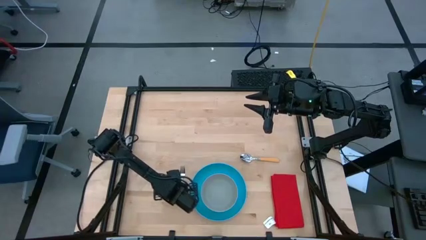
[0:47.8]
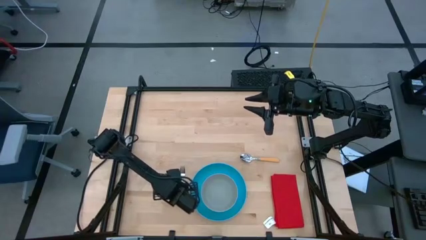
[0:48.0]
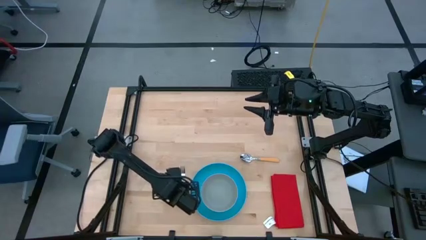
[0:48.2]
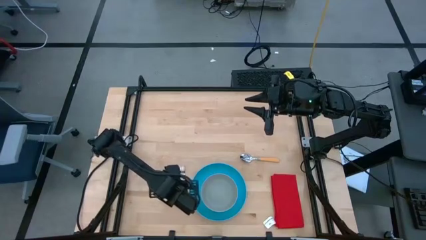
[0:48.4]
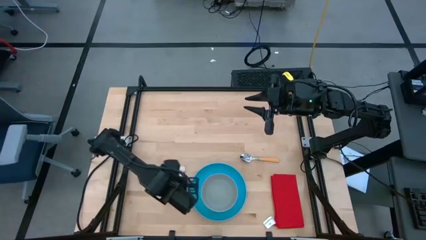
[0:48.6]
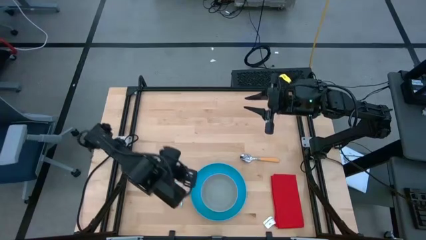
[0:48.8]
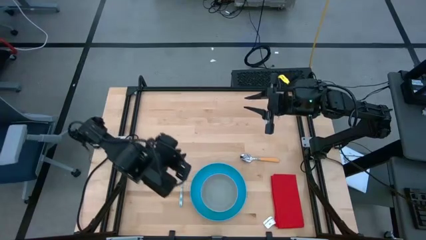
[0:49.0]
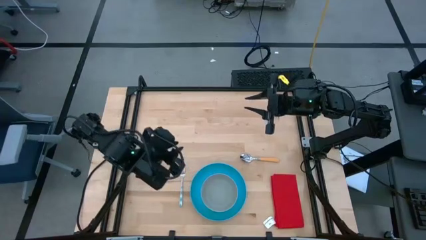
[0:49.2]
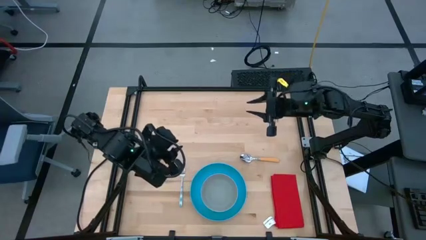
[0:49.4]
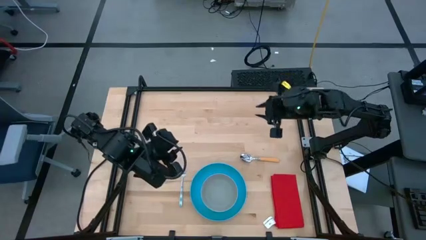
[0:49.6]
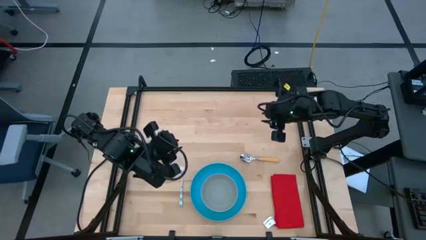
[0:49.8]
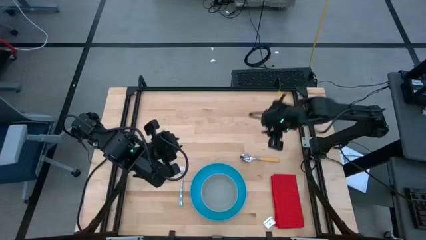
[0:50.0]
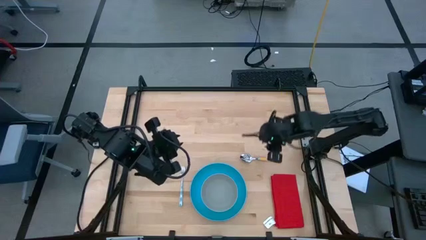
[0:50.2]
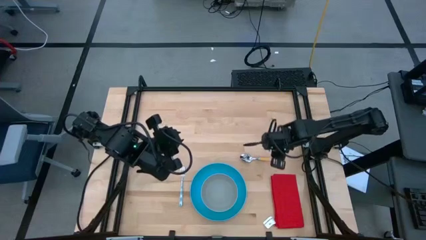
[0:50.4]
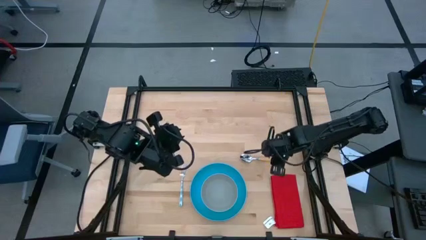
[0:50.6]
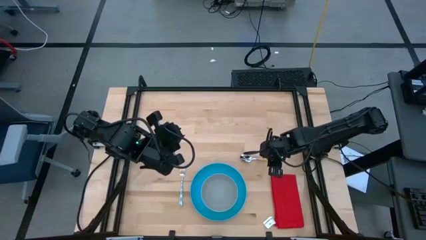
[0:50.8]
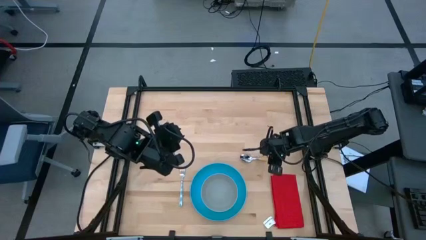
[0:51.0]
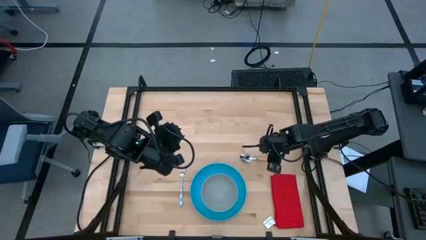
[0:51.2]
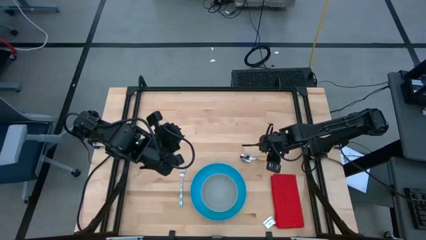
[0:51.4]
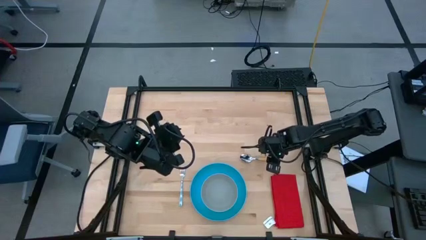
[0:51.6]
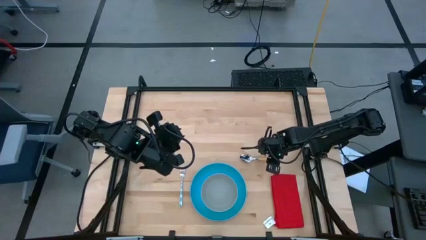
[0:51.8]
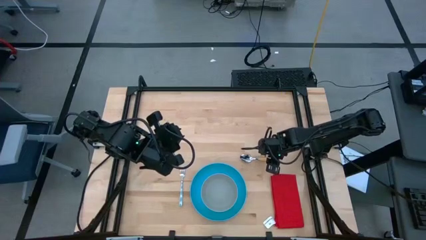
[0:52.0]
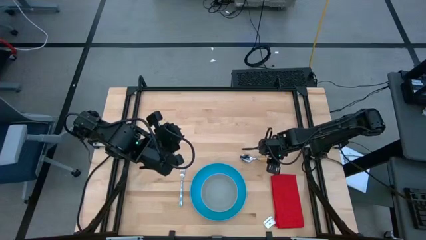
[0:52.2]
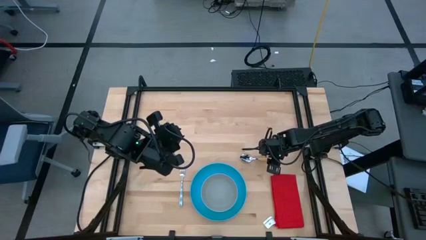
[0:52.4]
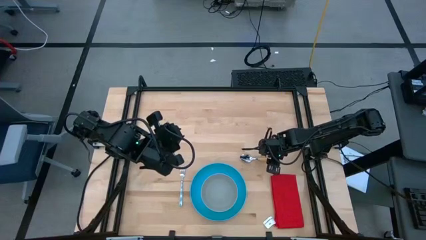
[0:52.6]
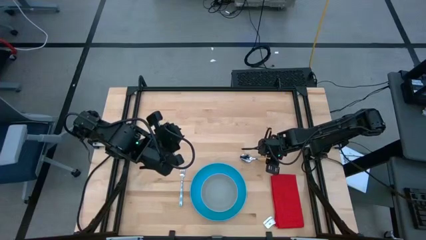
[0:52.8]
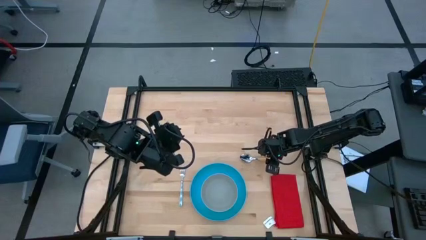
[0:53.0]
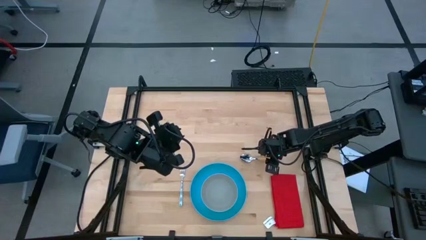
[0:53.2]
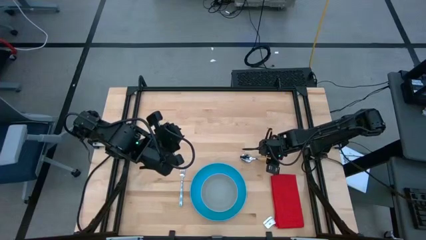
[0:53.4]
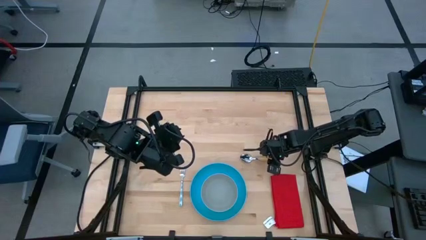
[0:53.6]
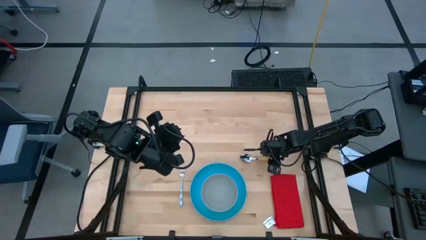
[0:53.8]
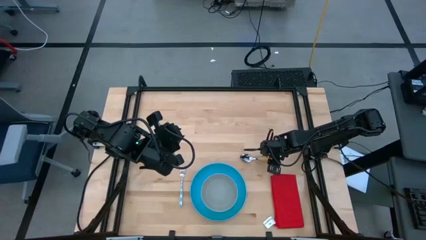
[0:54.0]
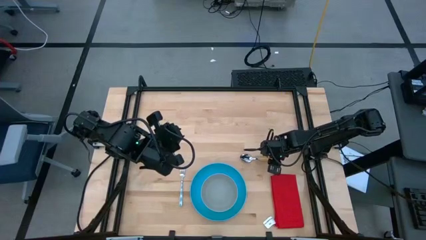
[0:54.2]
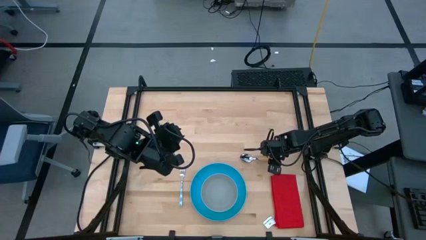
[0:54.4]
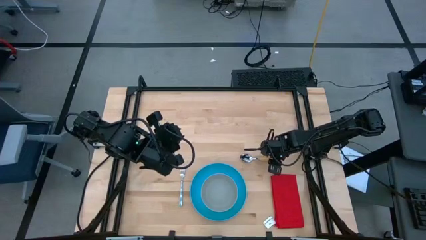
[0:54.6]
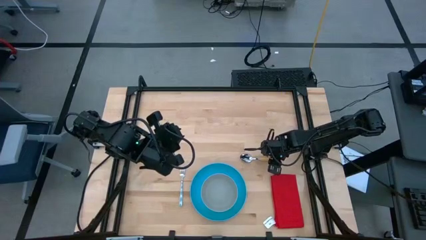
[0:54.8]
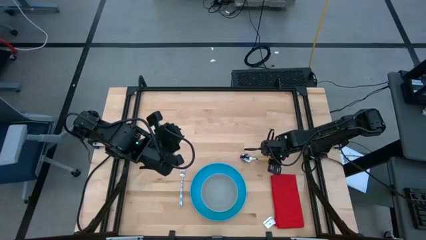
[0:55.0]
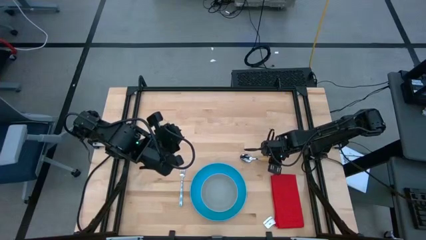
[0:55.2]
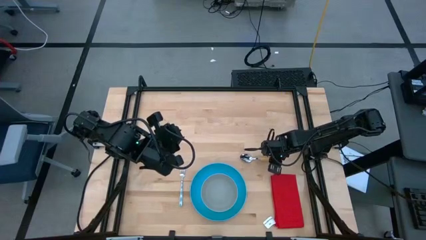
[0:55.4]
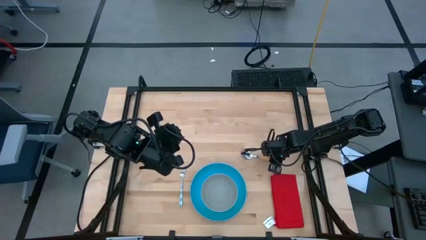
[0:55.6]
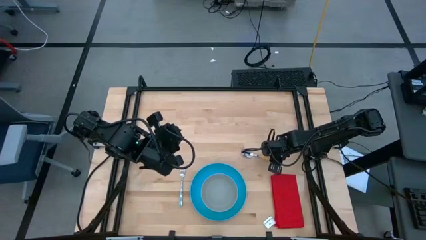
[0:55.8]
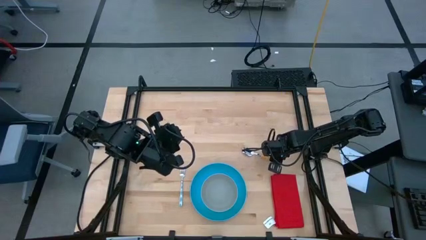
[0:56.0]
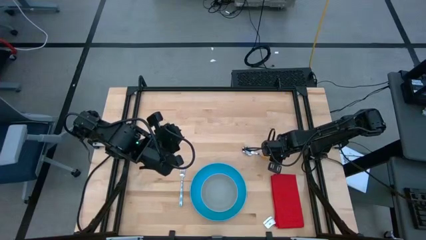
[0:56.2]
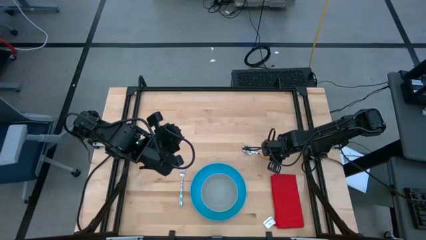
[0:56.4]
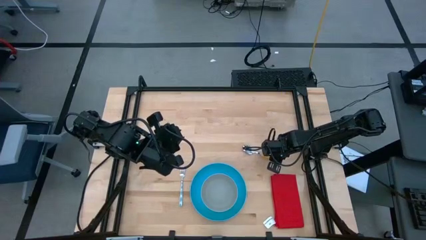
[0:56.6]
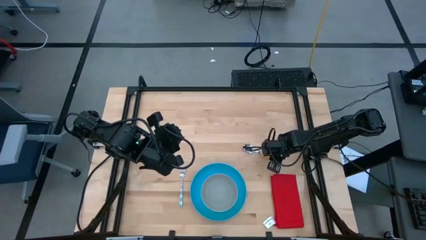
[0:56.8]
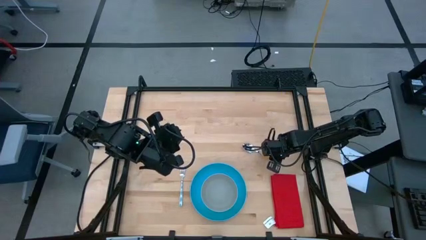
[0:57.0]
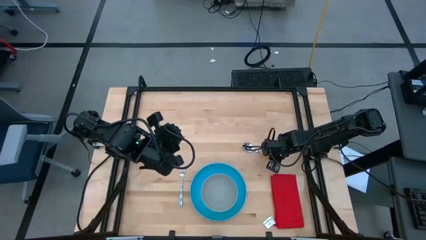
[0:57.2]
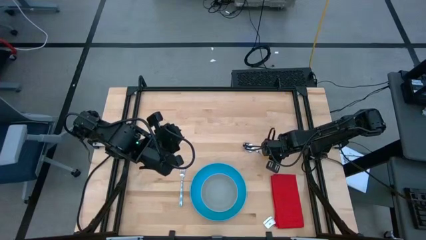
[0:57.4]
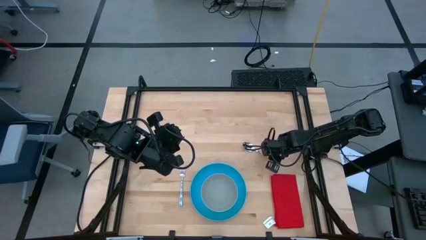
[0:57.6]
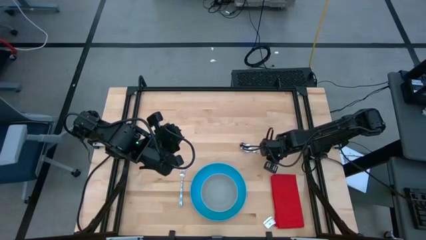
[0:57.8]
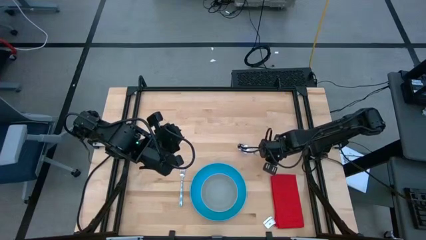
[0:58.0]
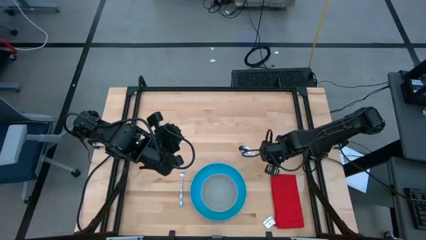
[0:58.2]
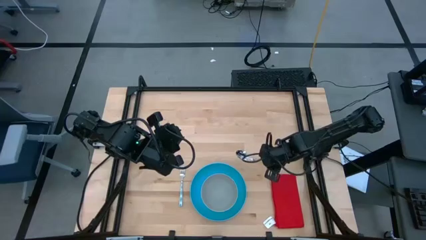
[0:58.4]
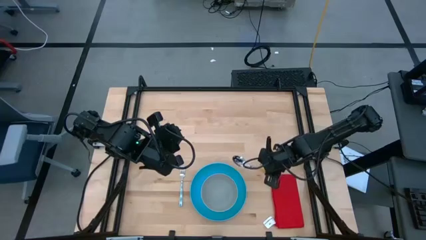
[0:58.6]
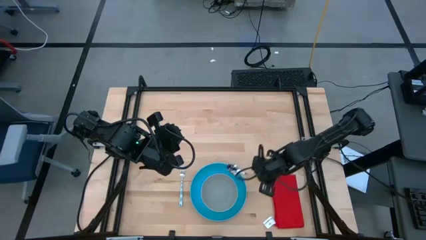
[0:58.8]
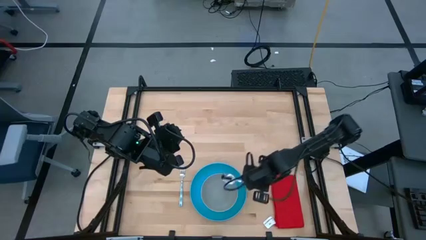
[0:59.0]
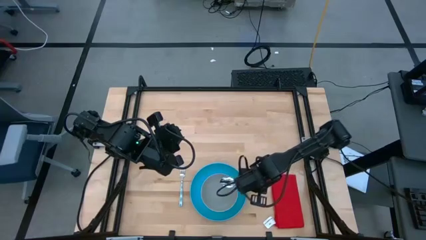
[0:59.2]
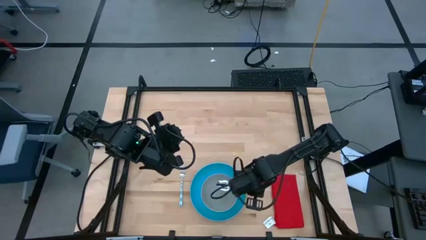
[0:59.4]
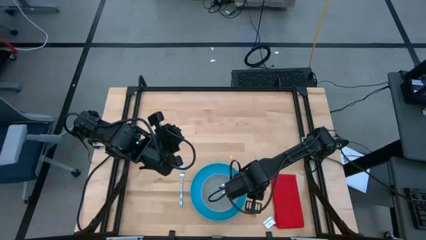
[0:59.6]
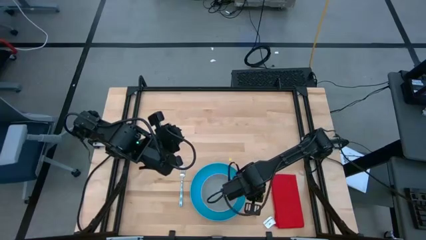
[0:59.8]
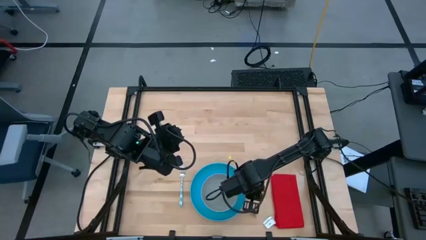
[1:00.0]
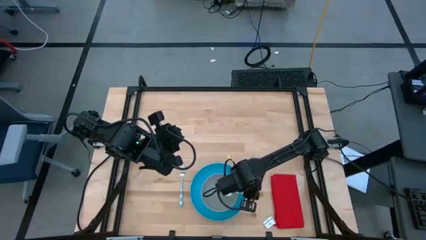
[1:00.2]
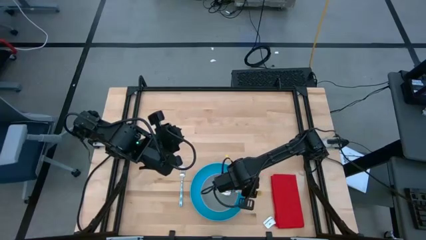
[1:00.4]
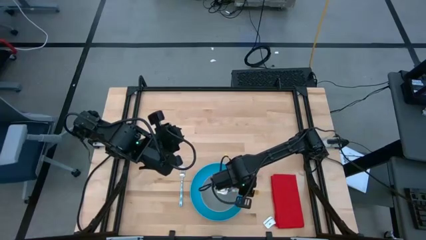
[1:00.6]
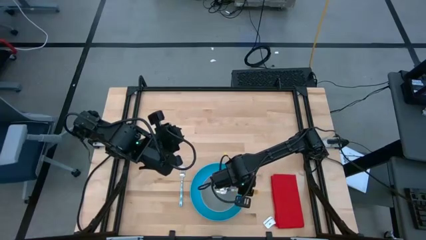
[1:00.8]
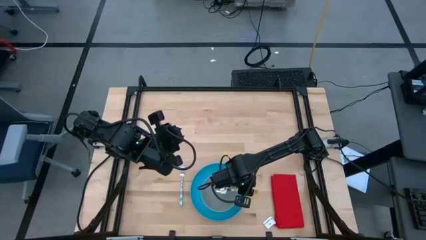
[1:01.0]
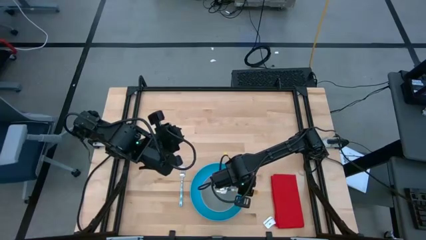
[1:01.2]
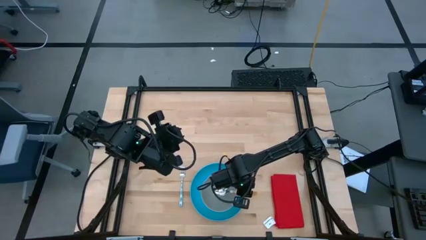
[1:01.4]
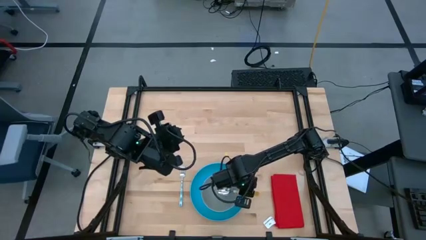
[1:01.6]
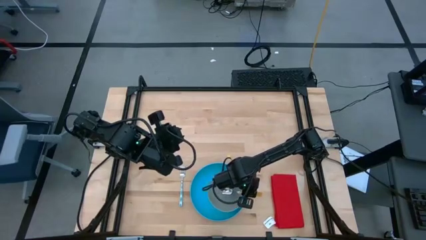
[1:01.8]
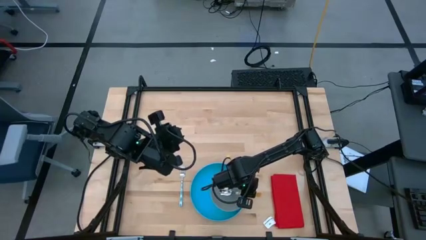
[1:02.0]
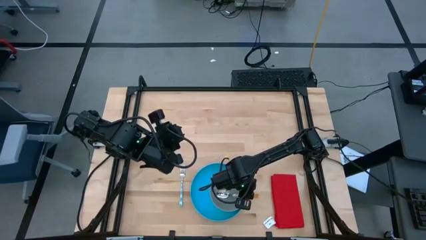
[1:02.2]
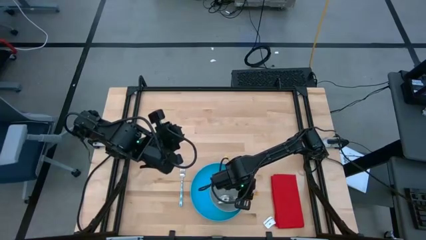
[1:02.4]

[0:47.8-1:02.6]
Task: Pick and place plate/cup/fork/spoon on tray
Put the yellow spoon into the gray bowl

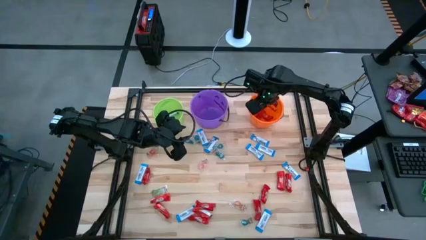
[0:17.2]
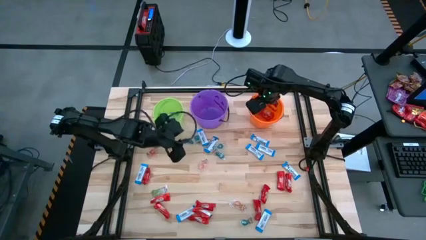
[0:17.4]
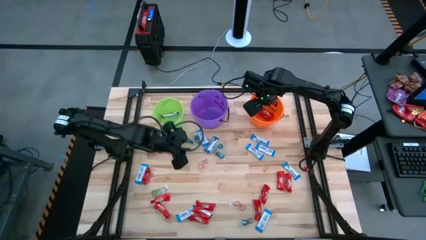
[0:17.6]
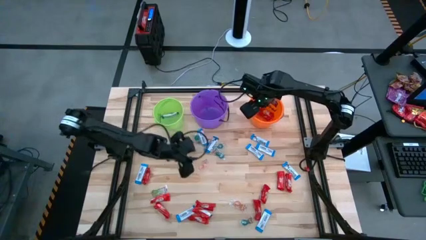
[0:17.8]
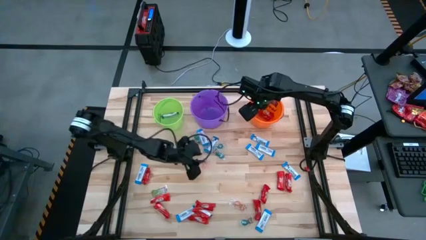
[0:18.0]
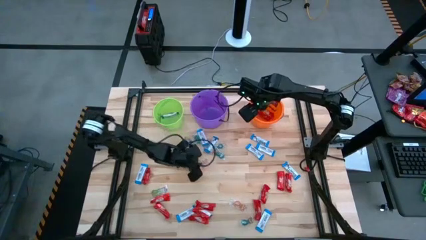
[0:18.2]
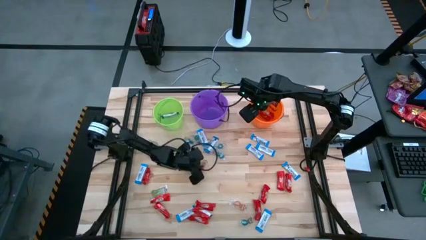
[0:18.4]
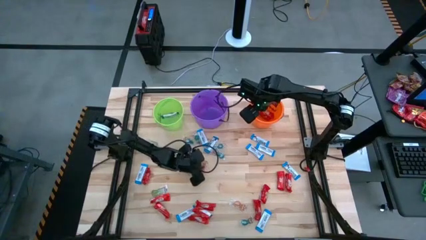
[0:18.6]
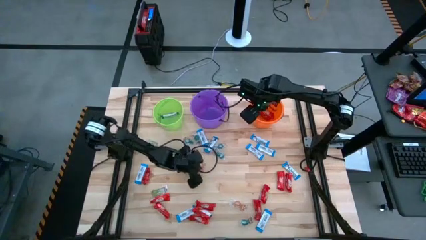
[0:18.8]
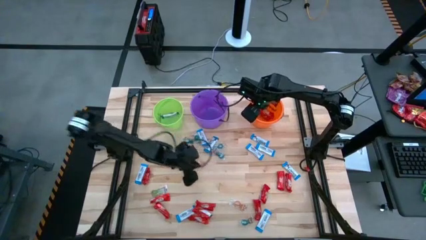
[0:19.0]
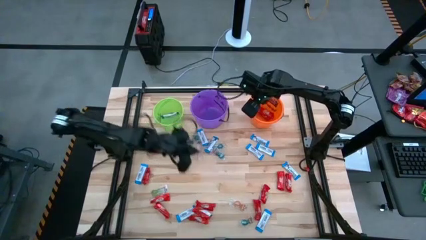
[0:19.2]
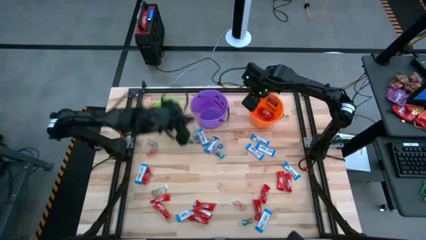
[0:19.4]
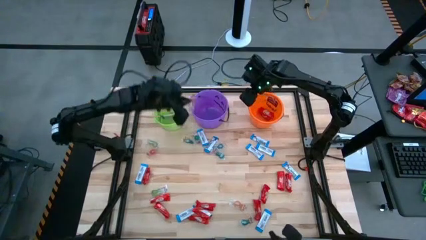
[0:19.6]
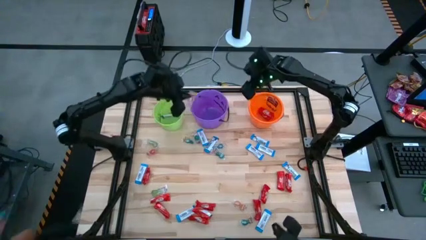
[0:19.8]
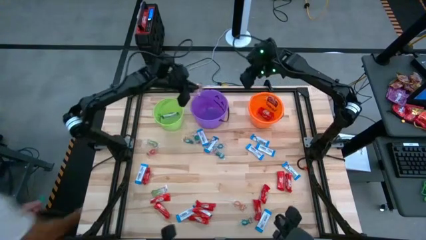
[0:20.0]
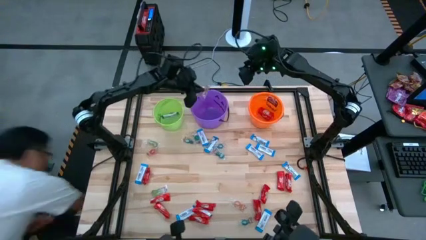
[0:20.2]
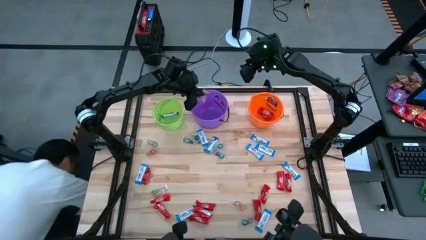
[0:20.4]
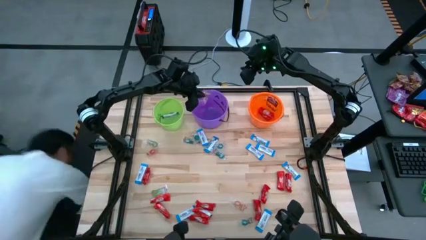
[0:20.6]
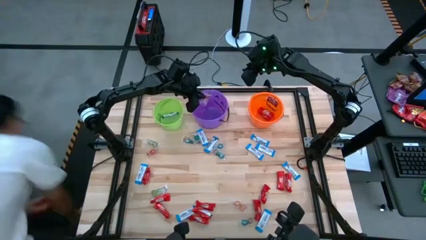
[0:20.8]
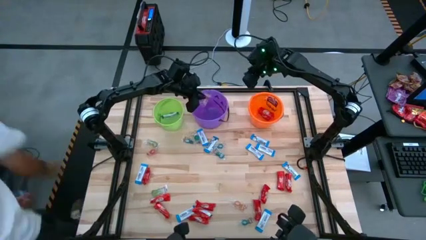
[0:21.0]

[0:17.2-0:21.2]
Task: Sort candy by brand, put in halloween buckets
Put the orange gummy into the purple bucket
